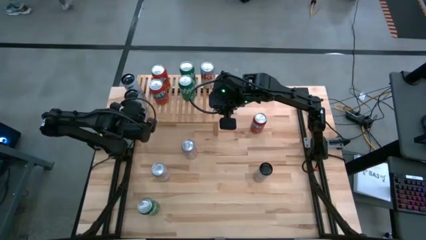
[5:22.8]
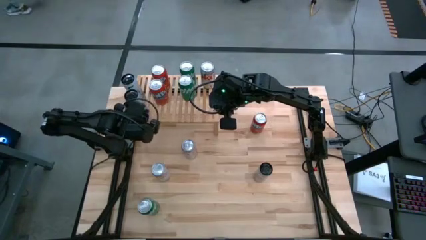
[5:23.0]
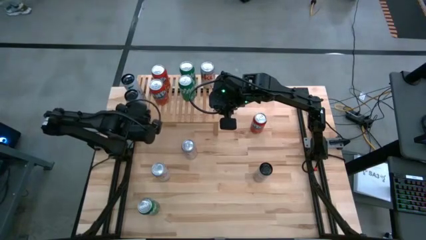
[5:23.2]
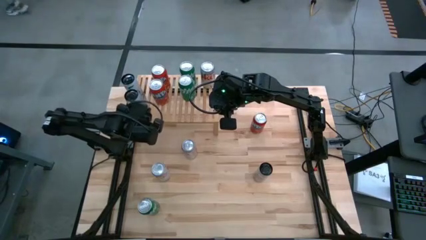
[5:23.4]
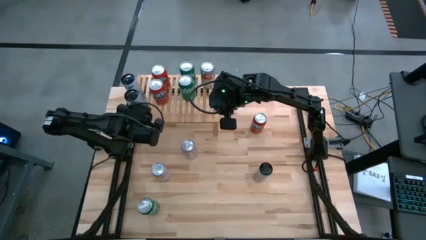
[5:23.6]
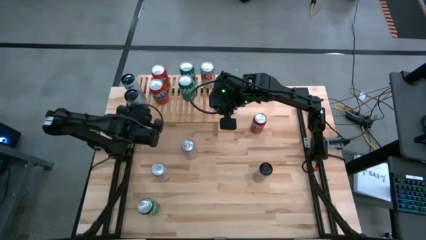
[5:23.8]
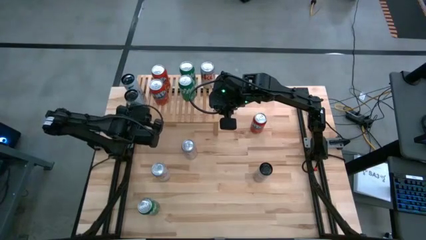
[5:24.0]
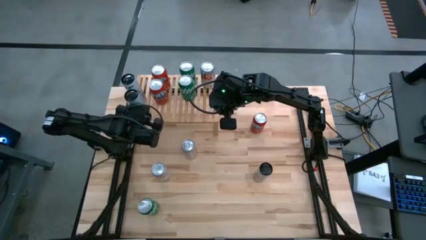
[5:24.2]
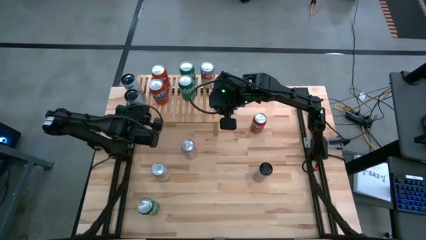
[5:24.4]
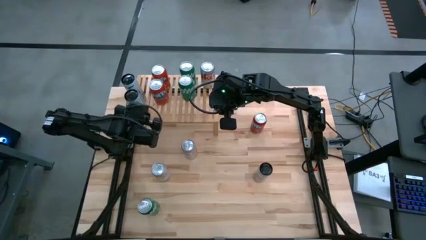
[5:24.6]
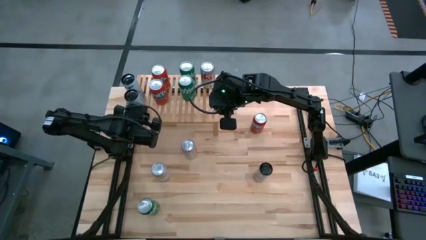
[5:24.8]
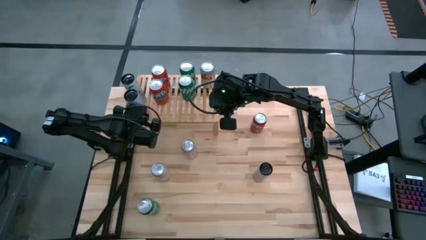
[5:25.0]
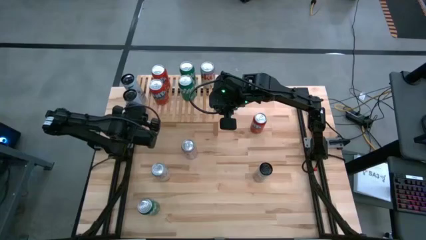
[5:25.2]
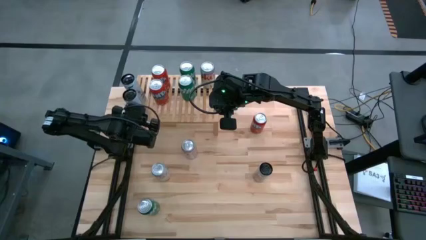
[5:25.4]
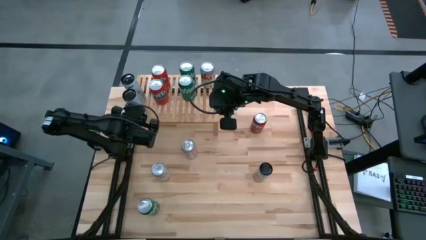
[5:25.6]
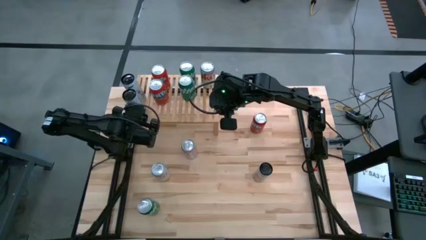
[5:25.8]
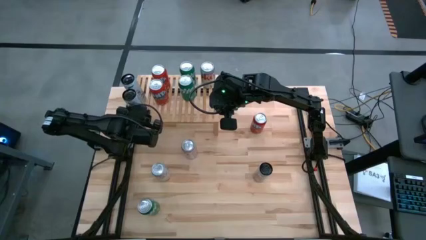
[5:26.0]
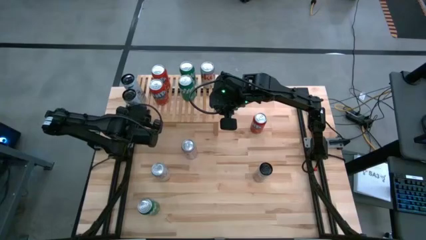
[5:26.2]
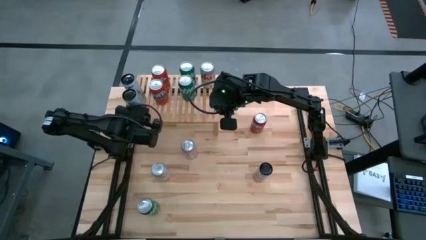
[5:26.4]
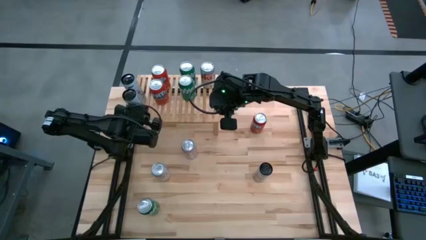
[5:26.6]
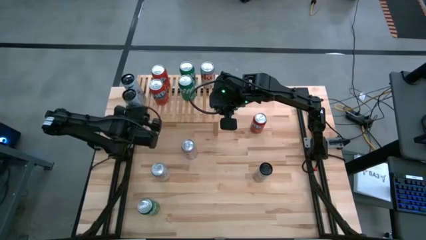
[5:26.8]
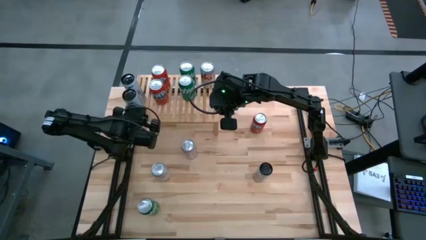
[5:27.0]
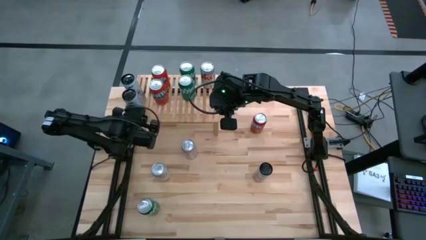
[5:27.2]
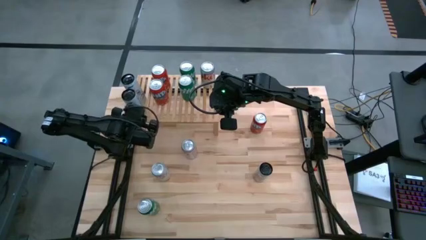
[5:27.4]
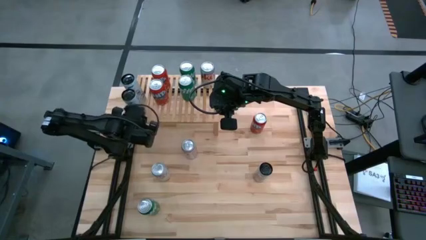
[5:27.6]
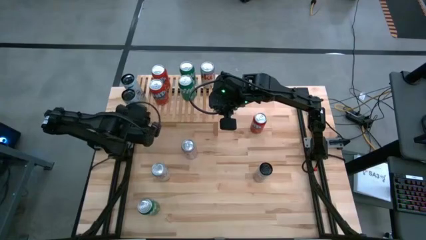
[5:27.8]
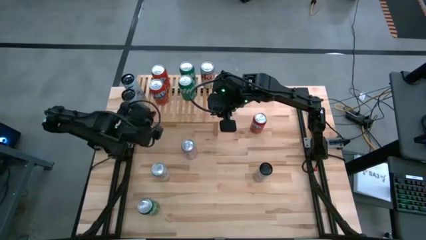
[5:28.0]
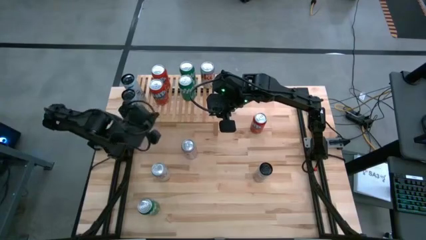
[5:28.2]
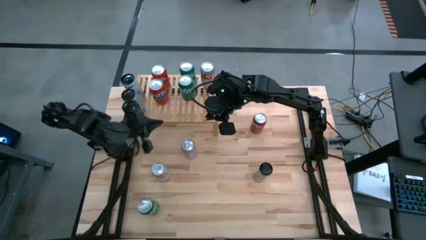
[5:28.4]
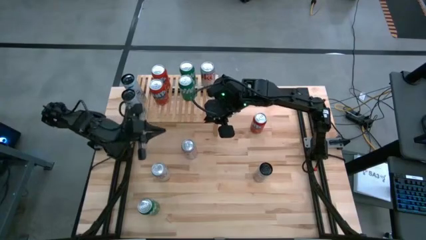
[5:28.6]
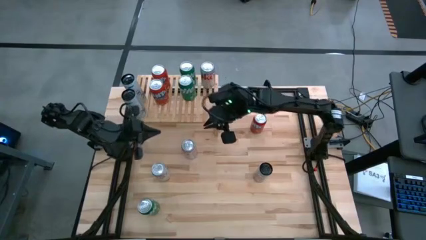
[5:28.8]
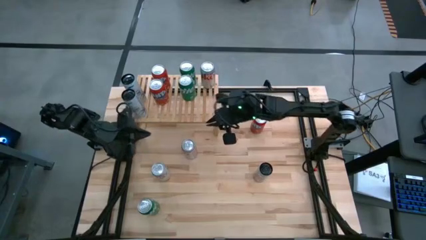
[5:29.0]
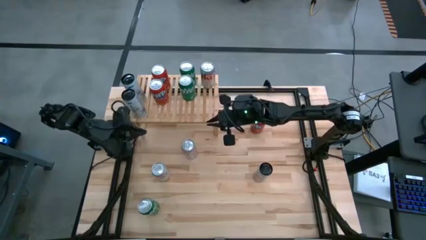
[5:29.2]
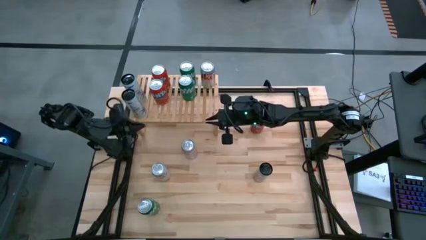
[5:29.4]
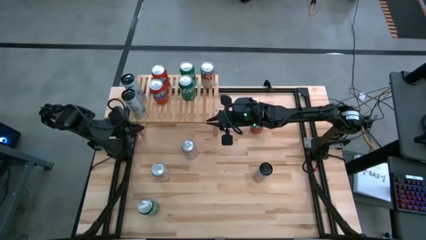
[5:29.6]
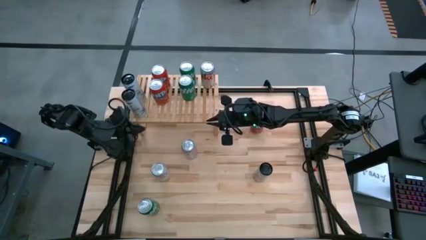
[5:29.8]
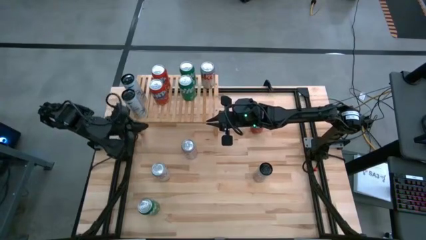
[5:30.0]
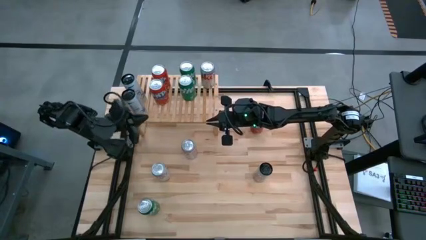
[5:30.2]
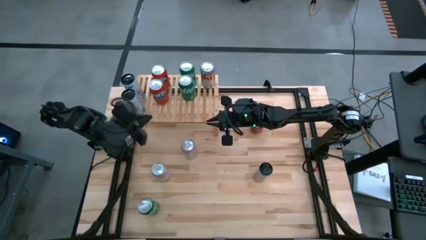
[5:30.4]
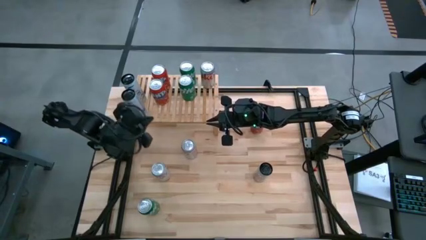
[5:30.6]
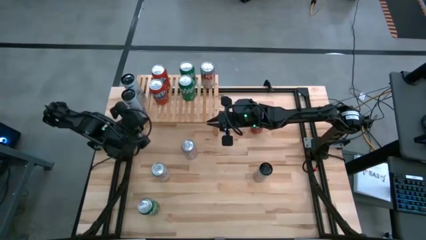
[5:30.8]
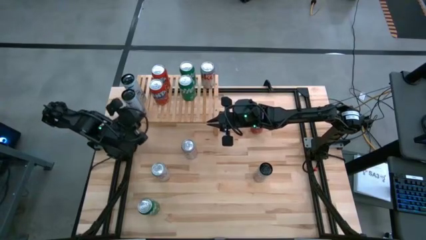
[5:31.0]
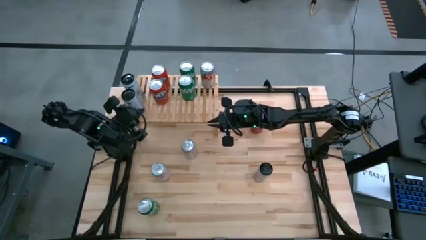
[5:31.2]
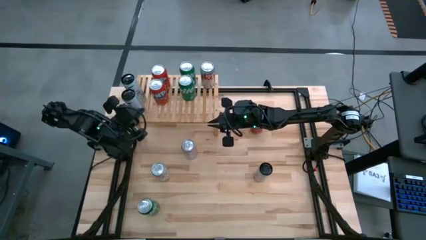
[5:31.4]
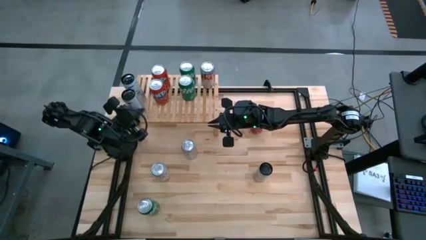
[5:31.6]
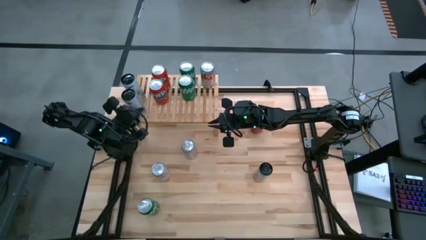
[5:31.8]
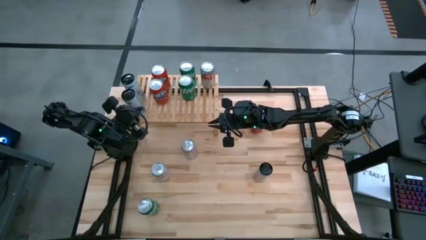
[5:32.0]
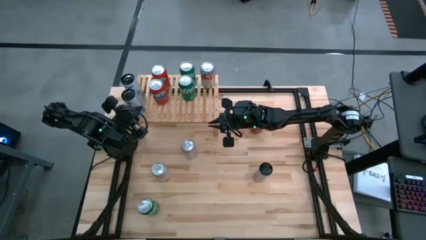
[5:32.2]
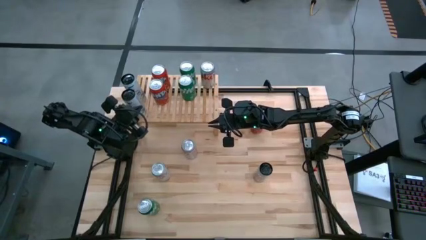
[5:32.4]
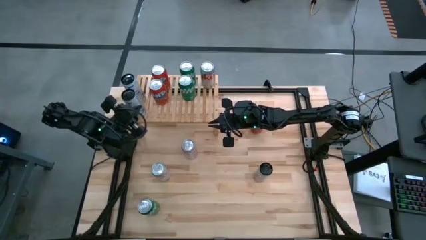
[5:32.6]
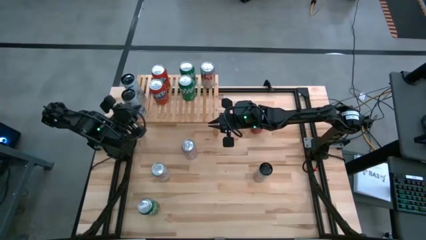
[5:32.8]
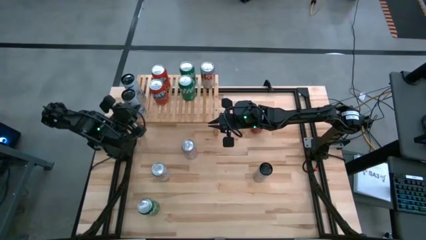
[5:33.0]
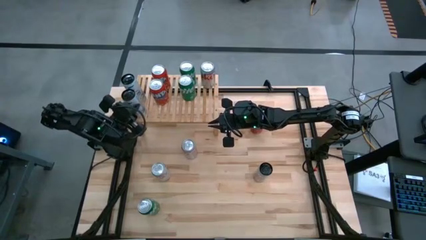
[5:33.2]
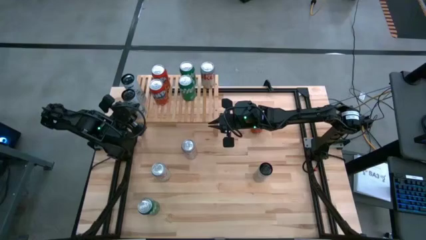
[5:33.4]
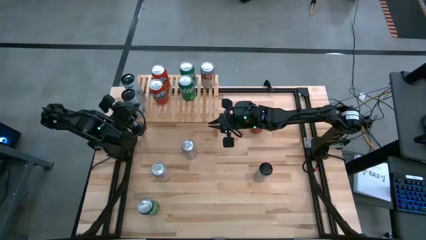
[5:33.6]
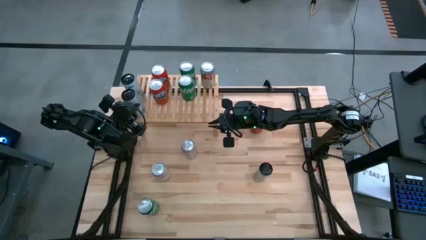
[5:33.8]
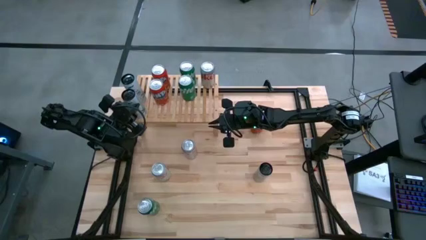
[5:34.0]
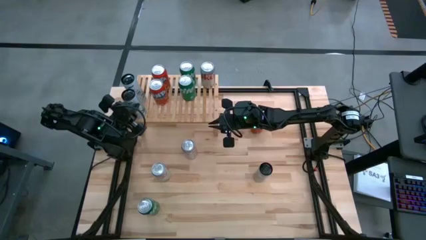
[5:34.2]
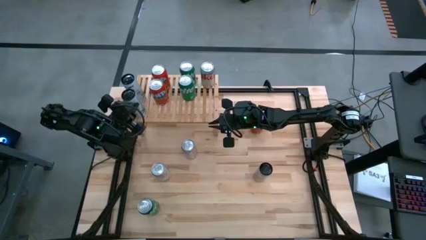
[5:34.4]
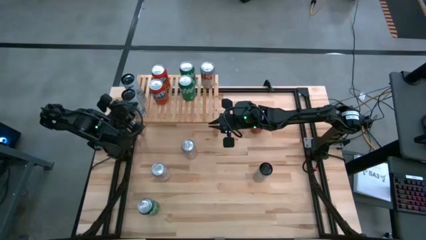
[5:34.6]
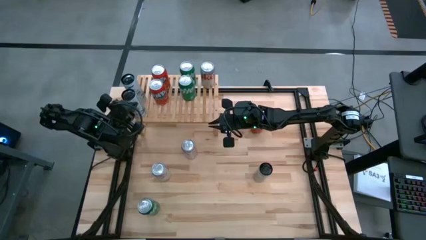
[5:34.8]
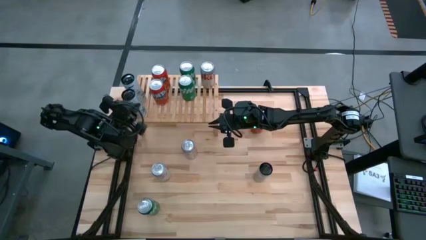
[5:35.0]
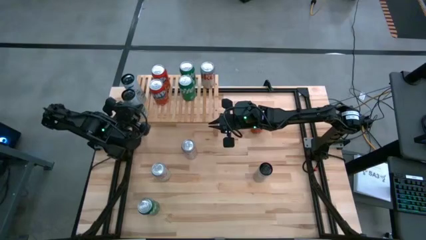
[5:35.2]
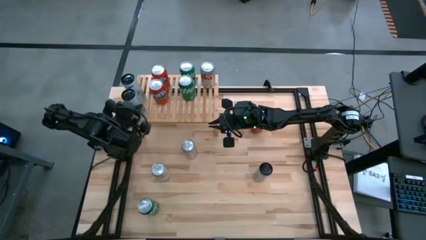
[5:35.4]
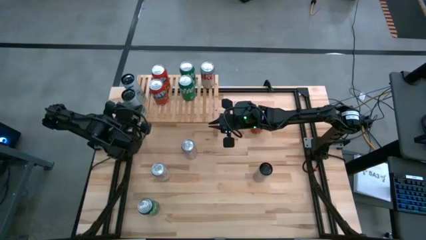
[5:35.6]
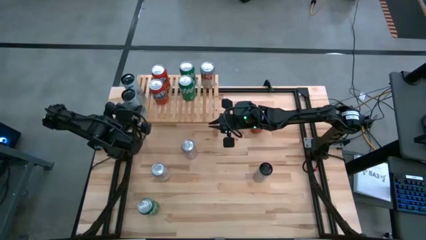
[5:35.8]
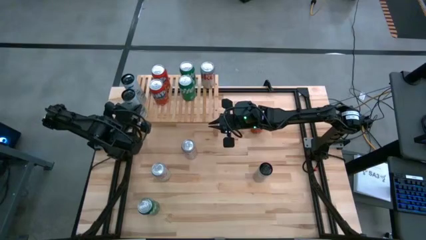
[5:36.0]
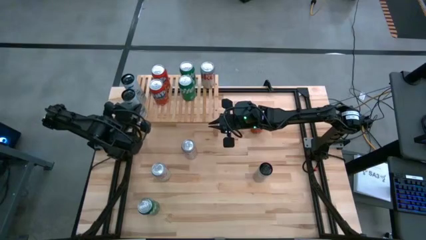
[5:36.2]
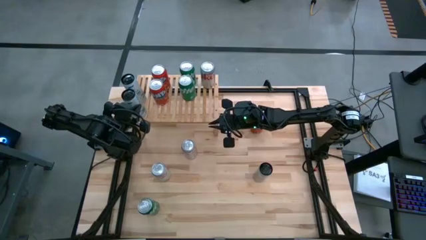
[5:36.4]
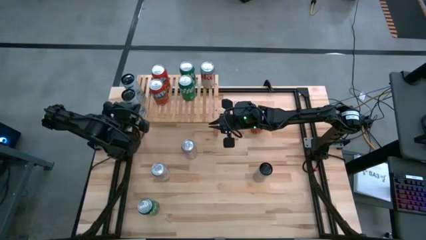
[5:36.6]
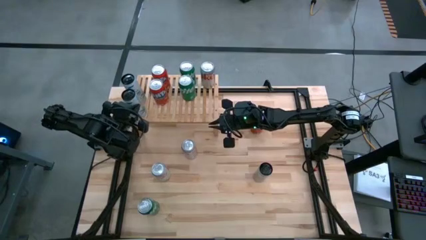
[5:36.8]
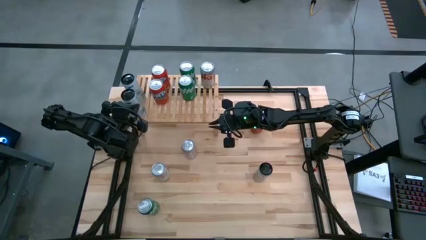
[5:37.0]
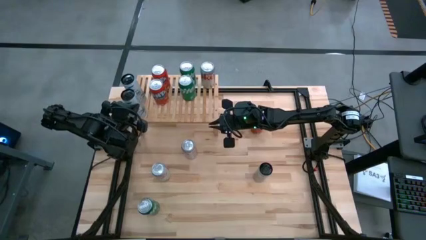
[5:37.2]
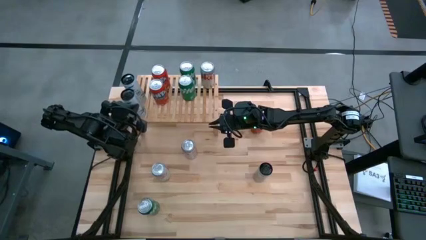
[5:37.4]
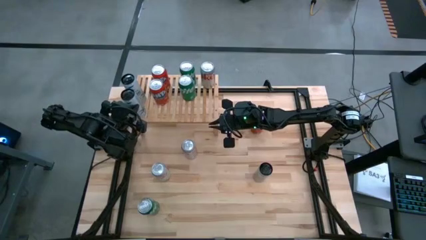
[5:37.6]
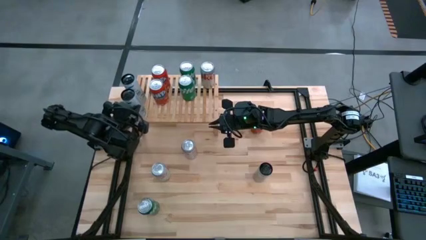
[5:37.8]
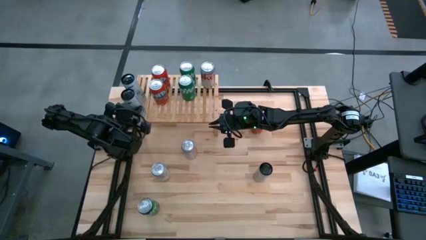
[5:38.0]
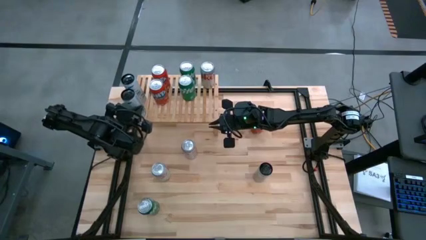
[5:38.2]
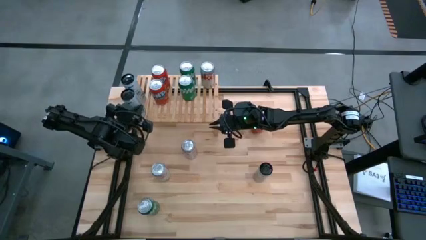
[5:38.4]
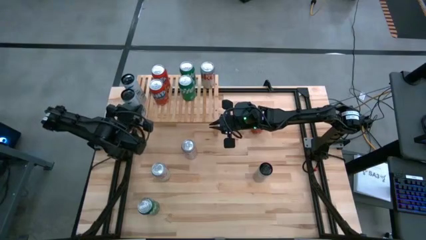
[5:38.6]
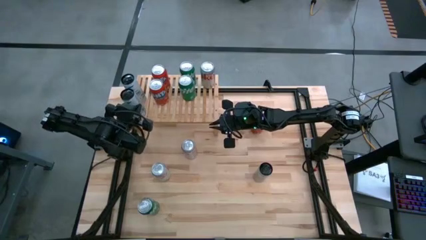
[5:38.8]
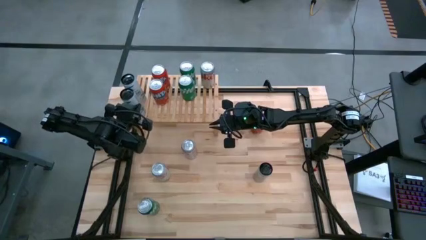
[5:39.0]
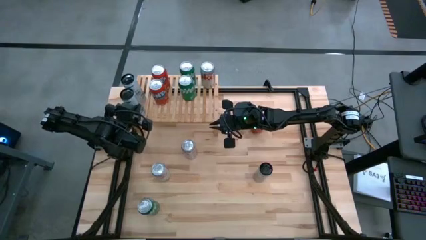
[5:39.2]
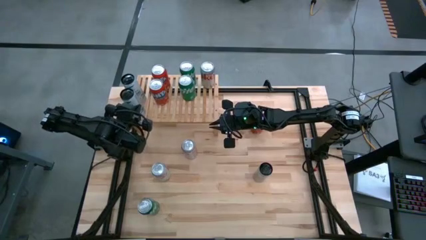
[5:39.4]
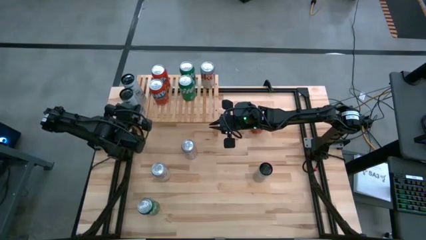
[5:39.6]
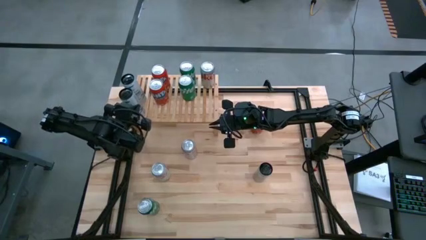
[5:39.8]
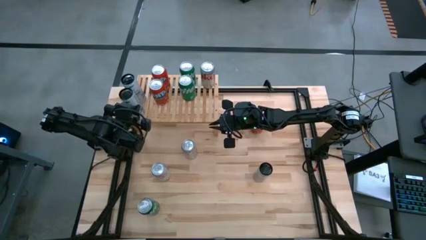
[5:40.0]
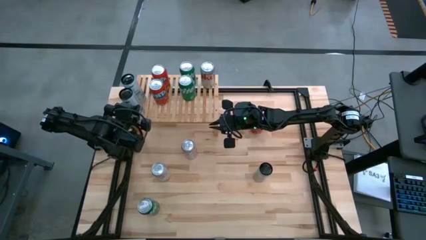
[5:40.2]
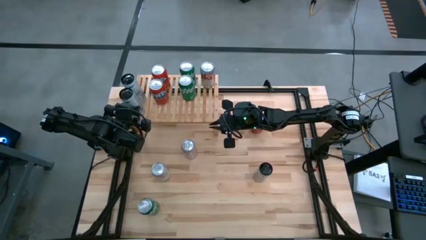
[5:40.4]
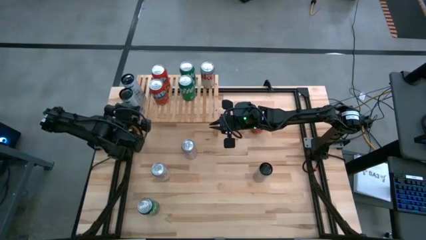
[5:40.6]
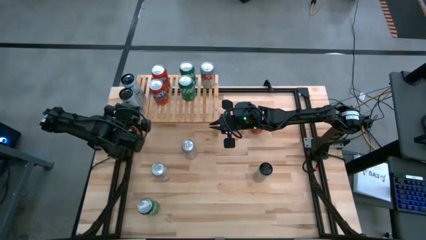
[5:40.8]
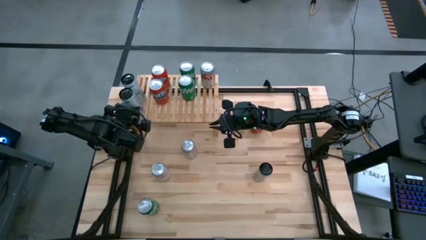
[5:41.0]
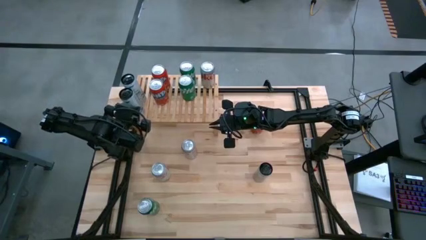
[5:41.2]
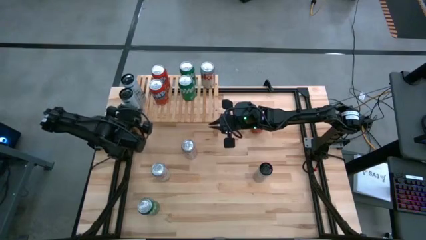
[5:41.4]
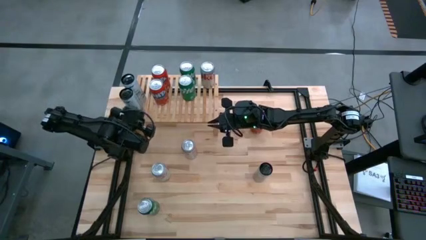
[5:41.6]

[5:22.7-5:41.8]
Task: Place canned beverage on shelf
Put the top white/blue soda can on the shelf aligned with the other white/blue soda can
